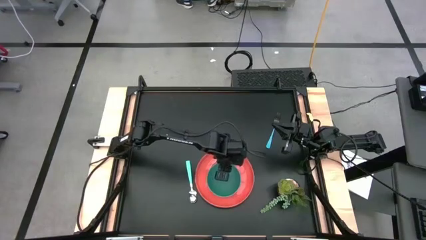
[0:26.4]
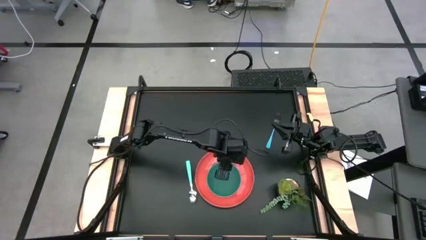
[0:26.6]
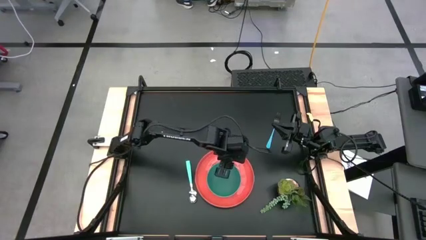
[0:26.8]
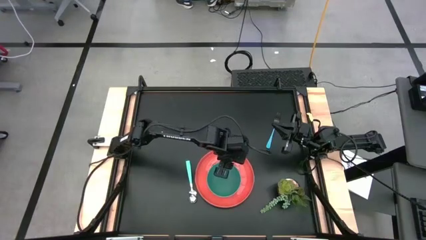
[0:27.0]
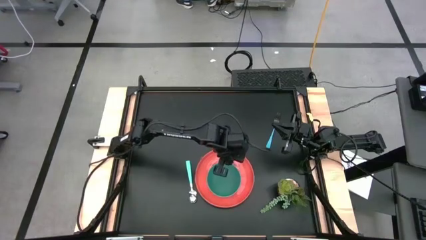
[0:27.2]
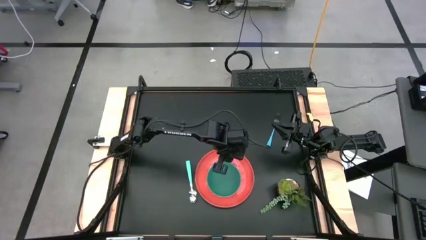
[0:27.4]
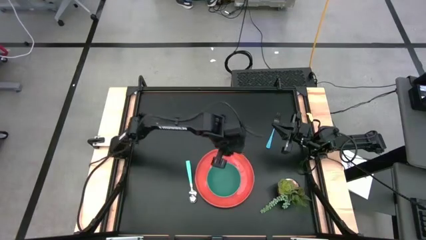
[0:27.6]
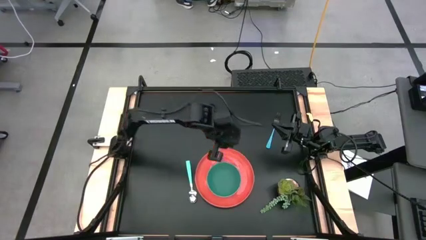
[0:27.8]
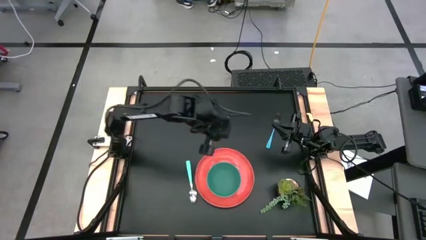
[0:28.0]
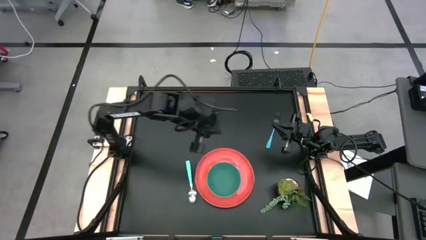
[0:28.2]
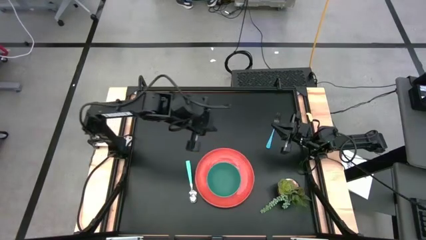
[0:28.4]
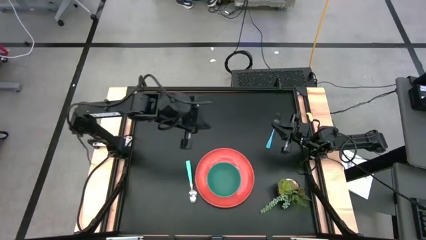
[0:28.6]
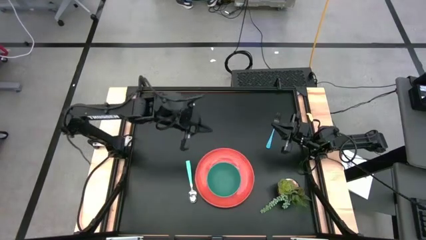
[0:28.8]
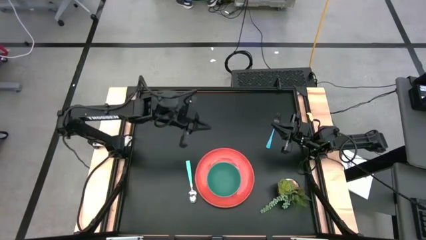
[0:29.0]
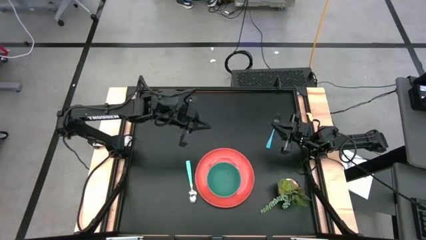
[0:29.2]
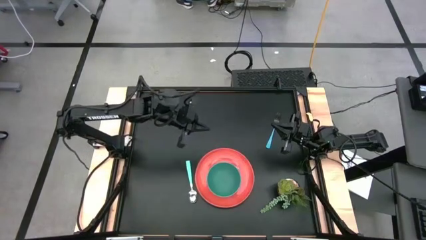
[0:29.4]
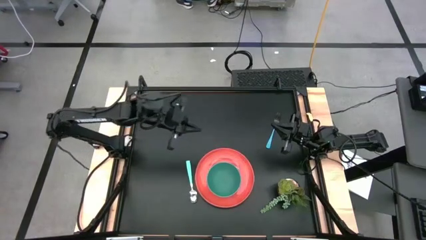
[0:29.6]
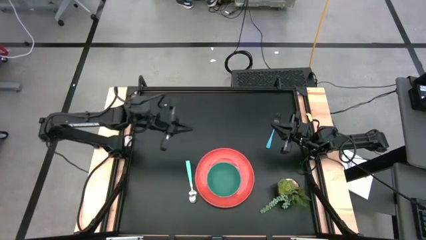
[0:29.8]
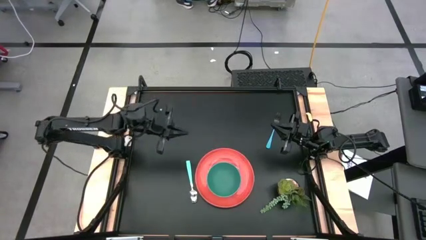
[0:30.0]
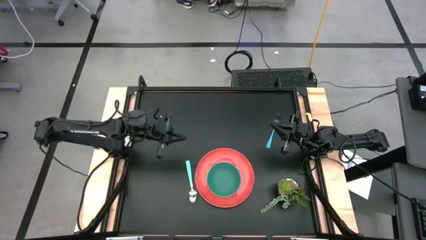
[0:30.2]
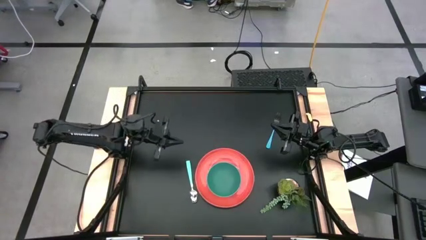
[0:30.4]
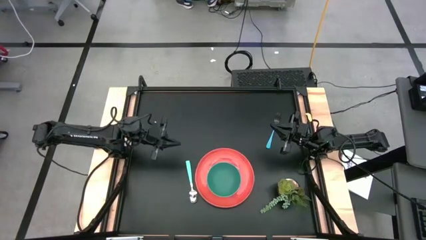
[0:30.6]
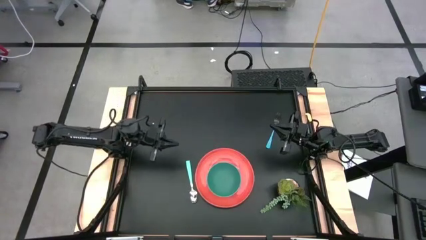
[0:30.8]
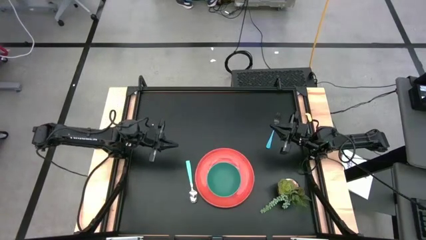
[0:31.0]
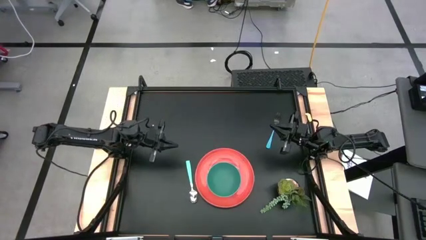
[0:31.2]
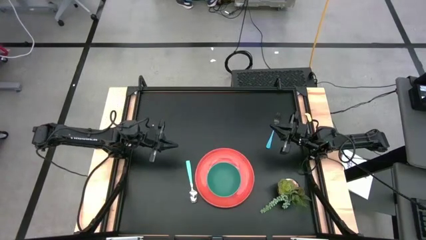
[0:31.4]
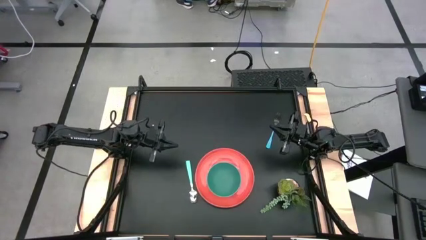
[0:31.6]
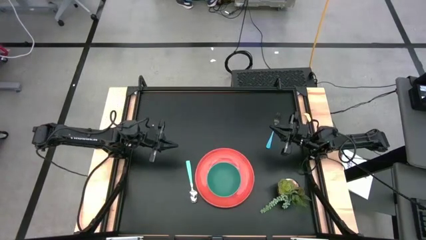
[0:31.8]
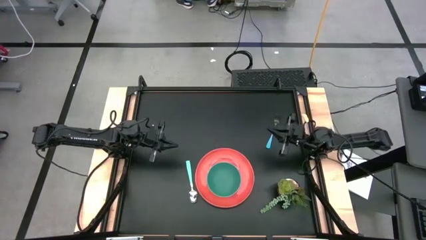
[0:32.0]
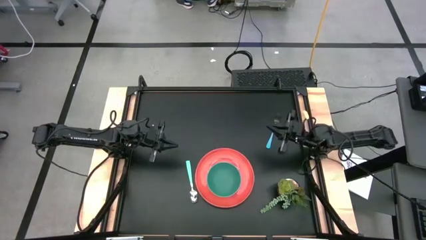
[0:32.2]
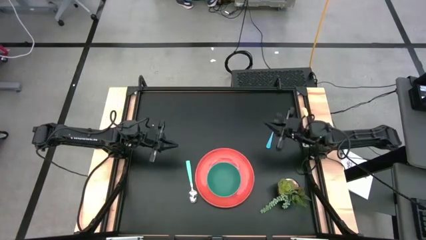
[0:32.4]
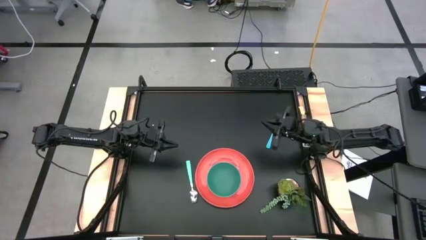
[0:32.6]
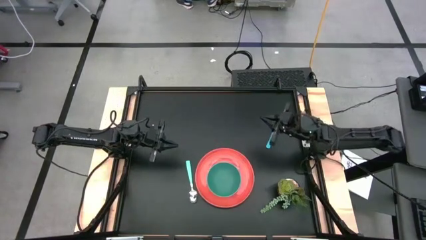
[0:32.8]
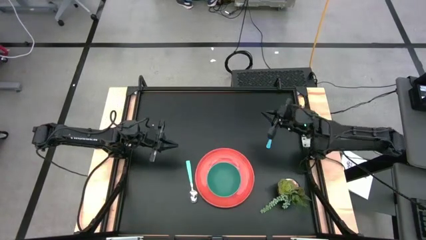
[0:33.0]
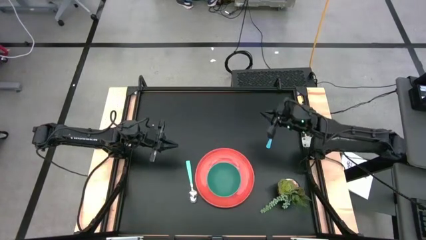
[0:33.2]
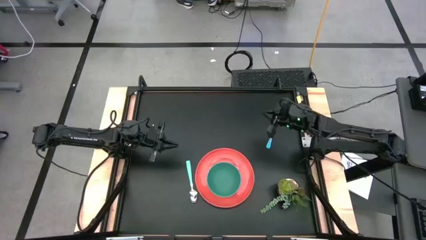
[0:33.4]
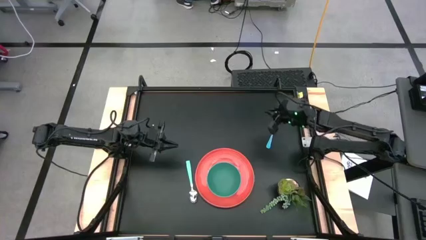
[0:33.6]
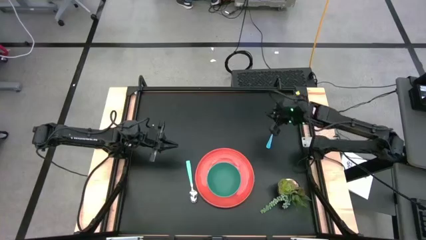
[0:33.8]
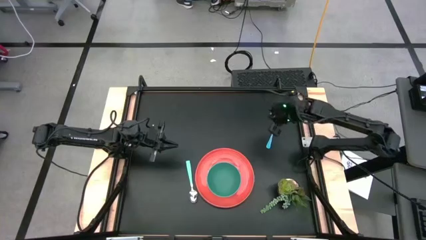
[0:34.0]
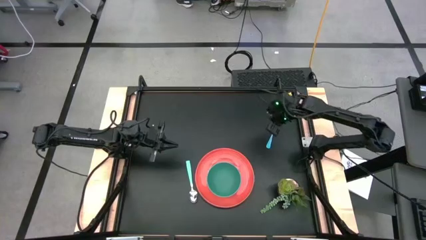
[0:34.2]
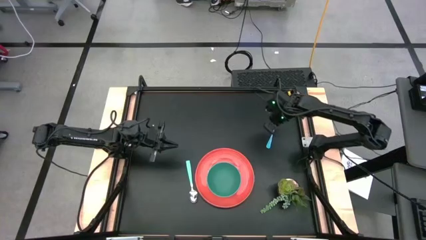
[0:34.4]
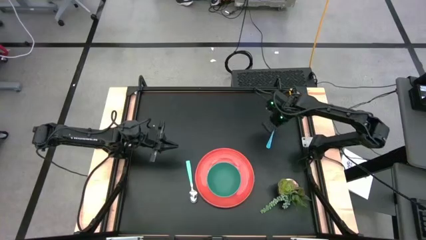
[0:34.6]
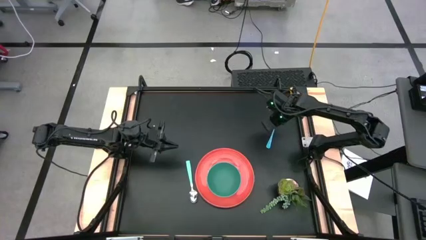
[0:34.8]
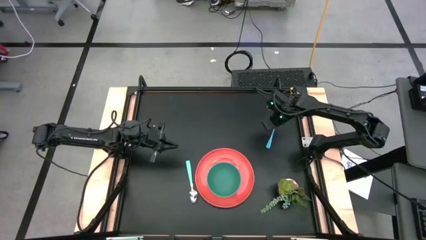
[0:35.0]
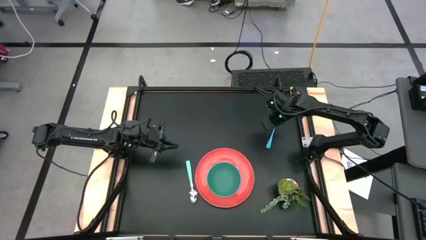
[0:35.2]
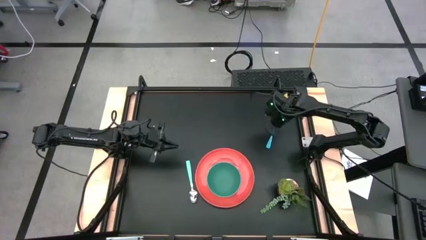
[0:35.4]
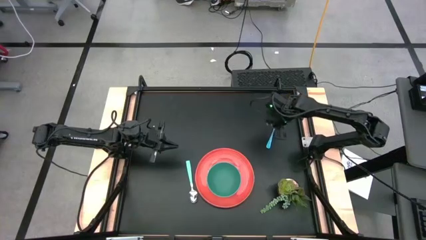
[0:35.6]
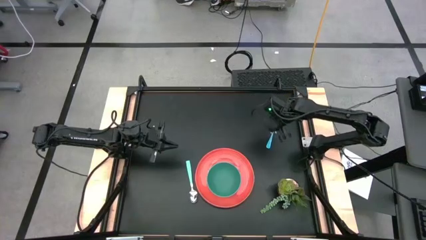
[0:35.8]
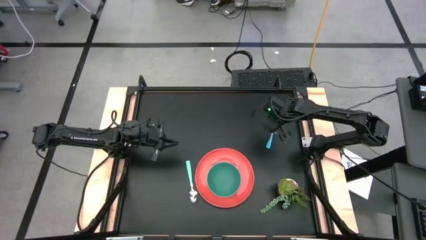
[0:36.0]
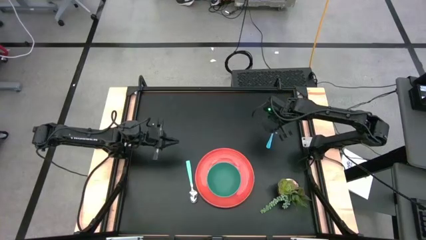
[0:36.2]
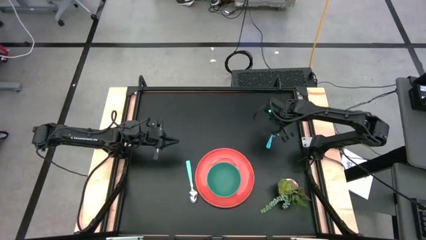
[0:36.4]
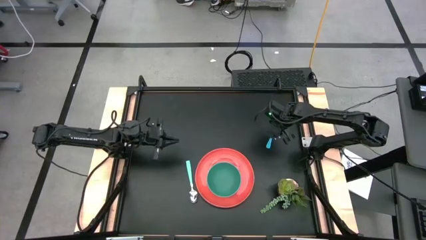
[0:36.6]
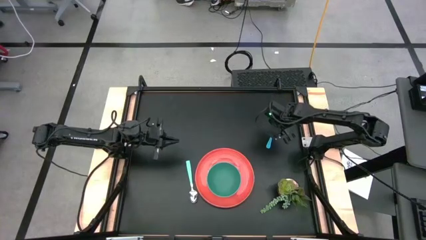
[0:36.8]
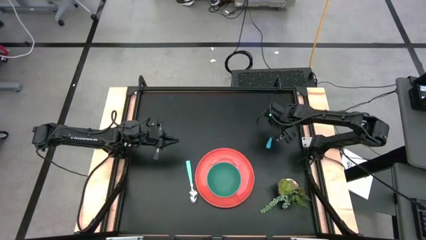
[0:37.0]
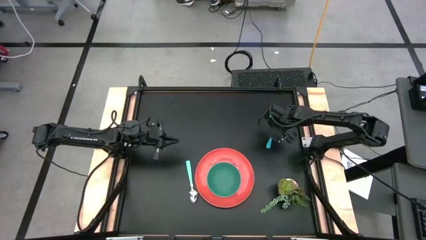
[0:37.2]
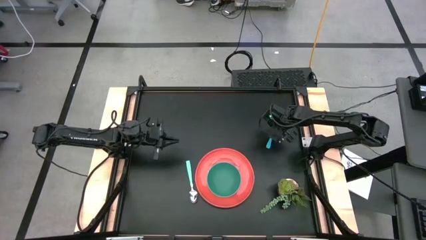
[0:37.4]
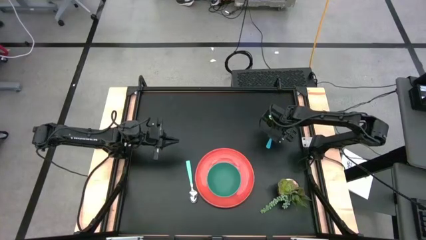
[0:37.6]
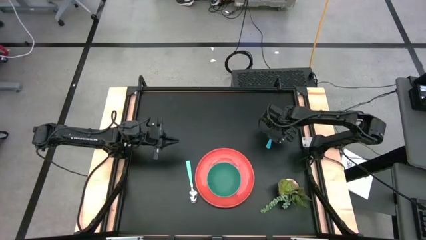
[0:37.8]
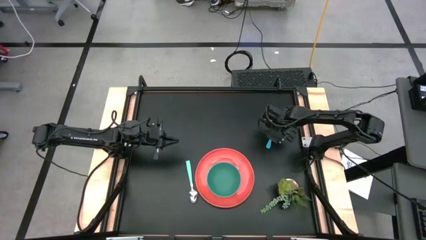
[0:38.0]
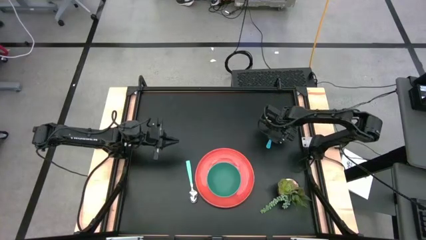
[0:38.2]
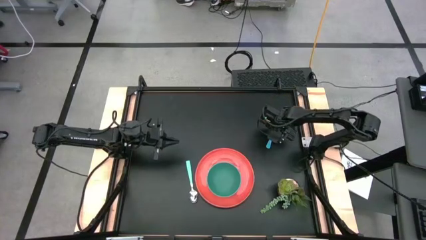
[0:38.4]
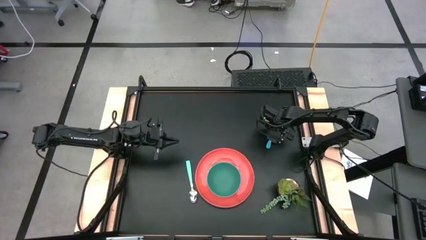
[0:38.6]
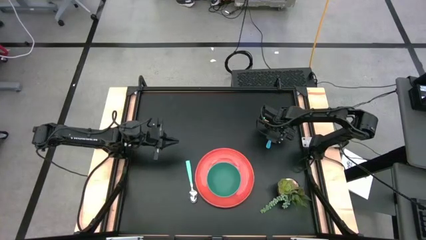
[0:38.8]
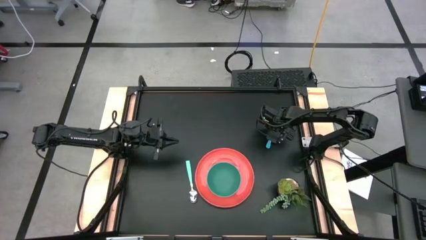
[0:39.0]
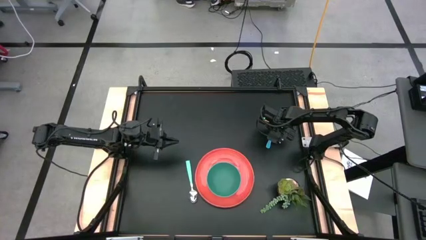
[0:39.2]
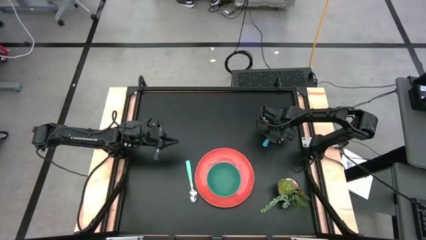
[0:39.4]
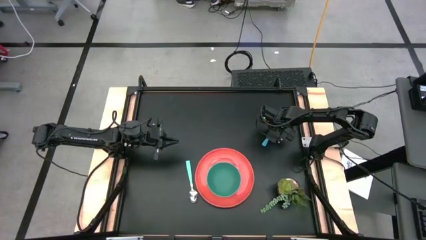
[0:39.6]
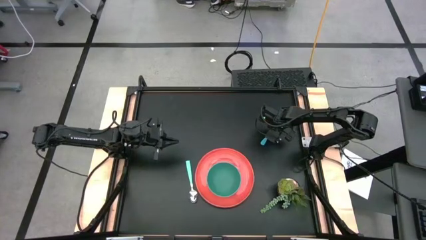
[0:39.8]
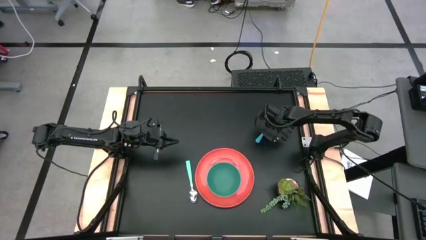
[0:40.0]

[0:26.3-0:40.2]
Task: Set table place
Put the light blue fork on the orange plate to the right of the green bowl
